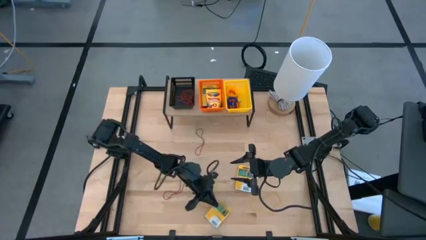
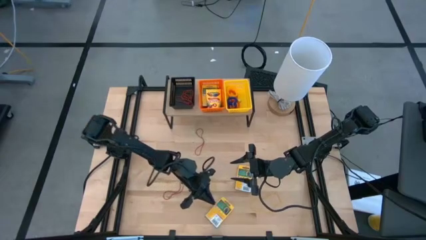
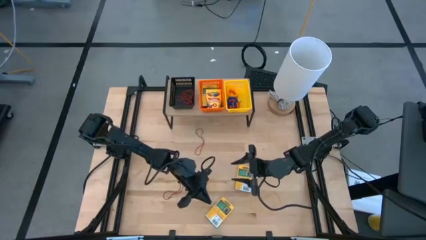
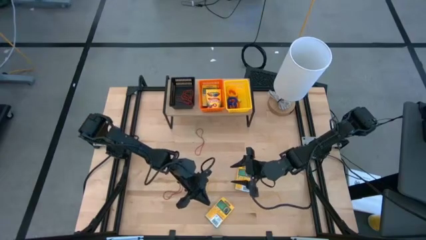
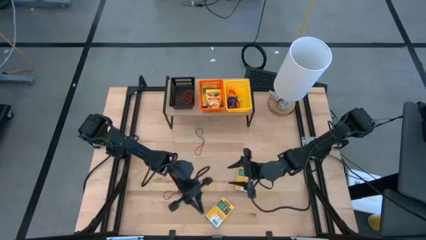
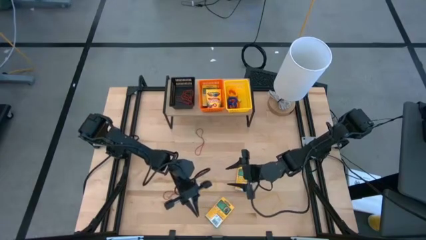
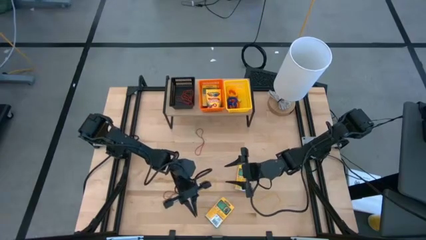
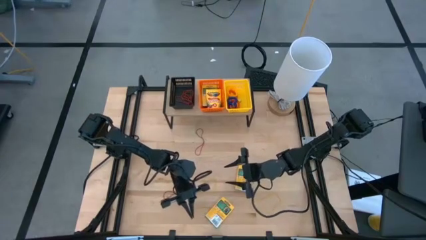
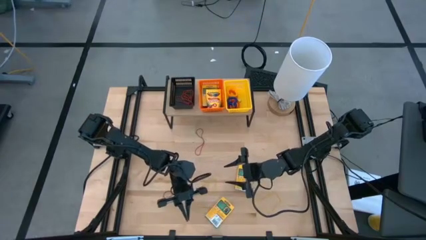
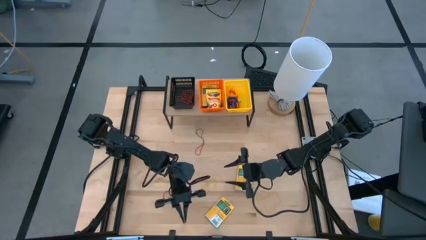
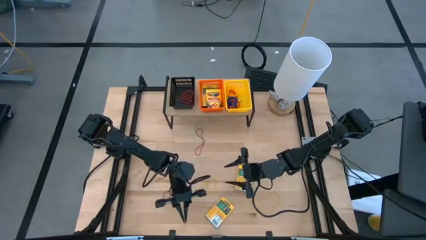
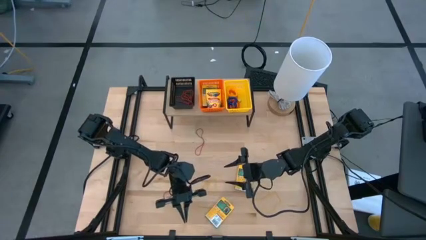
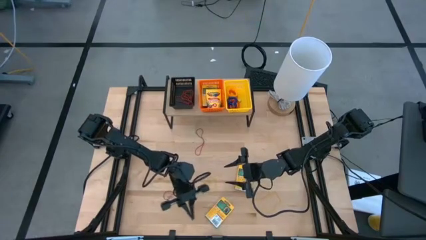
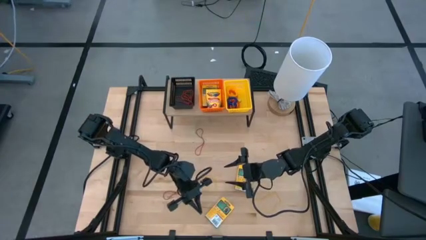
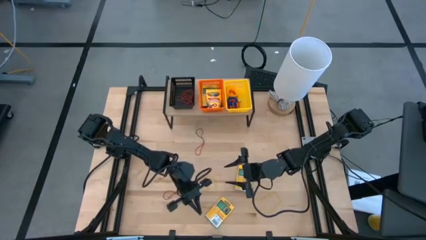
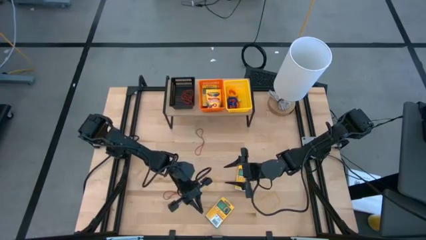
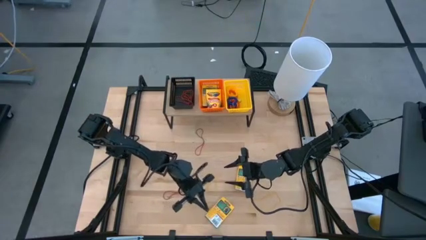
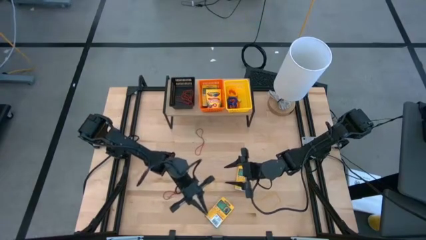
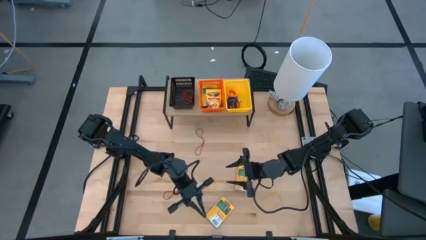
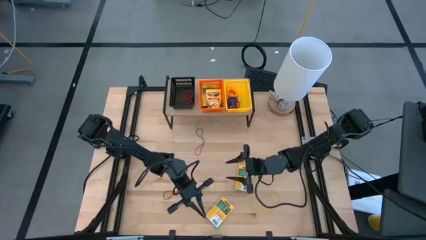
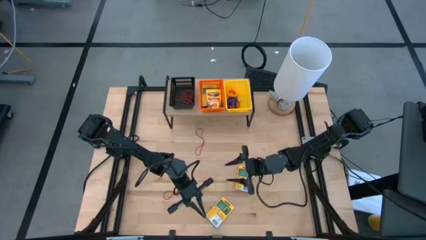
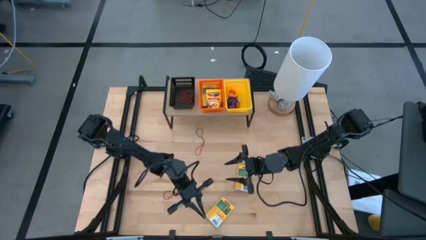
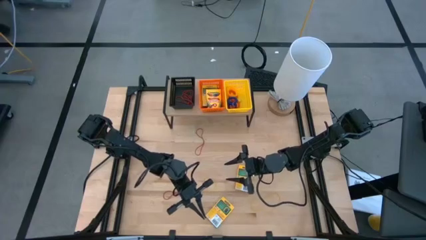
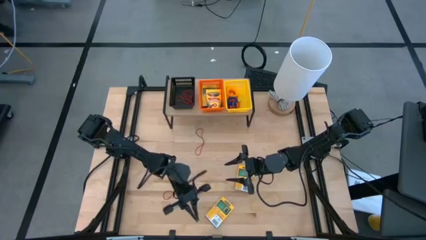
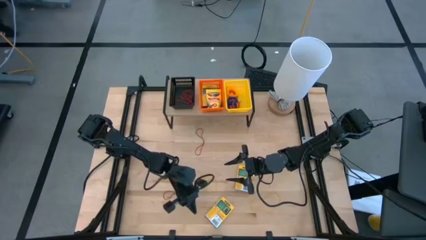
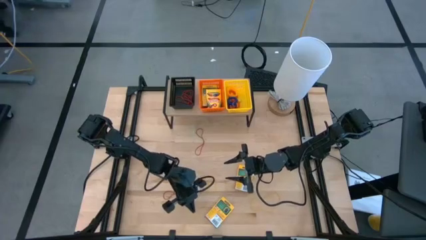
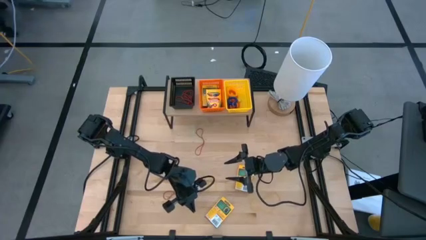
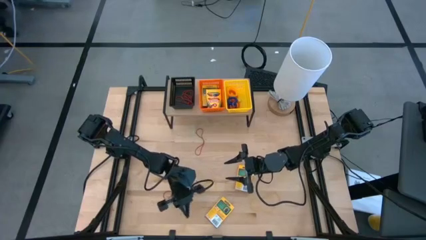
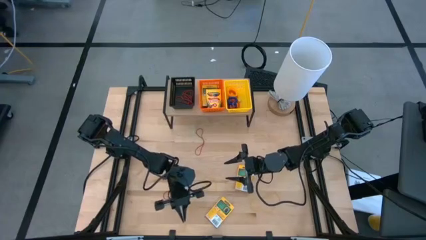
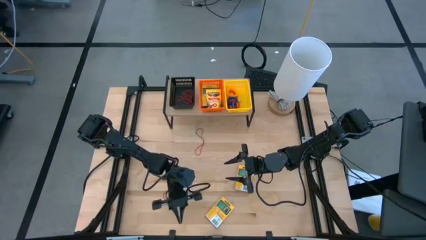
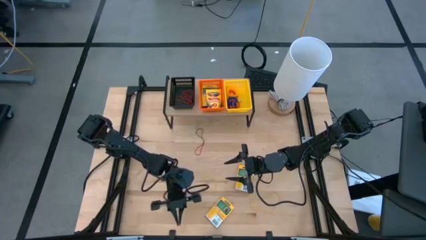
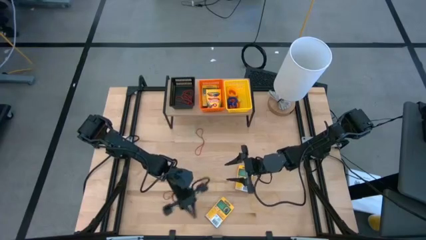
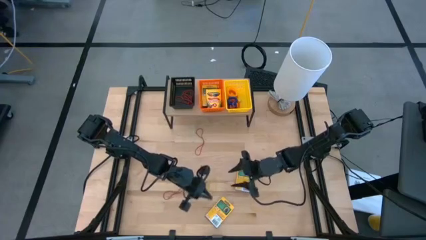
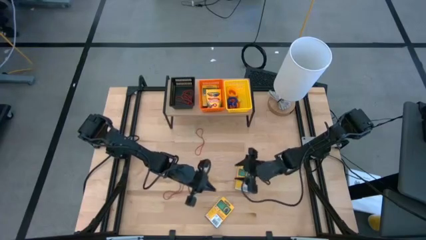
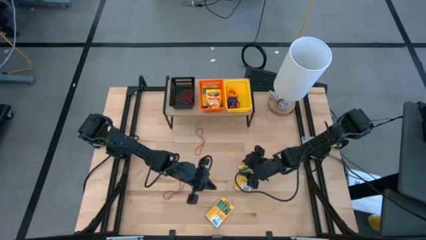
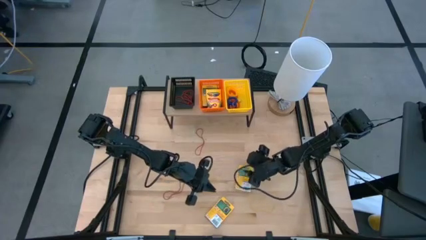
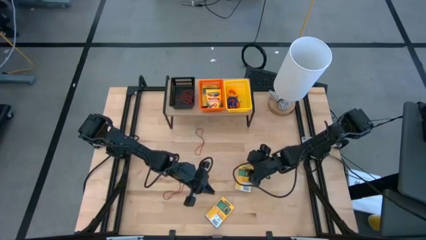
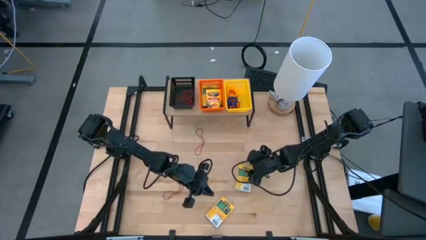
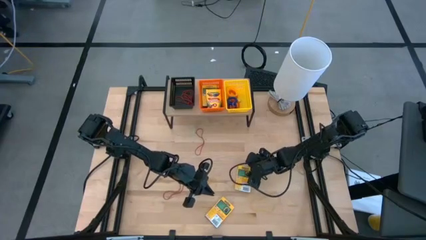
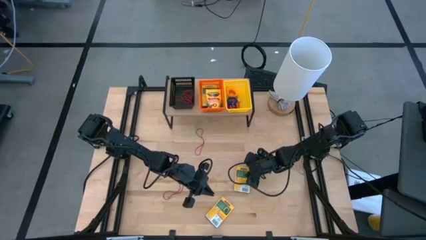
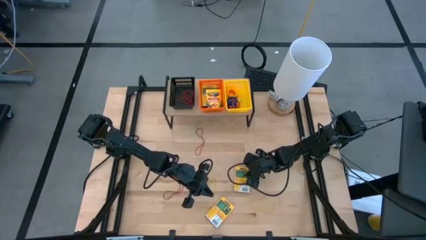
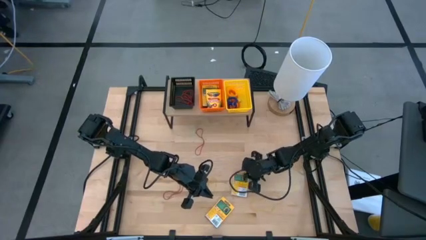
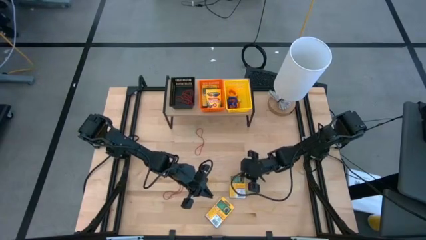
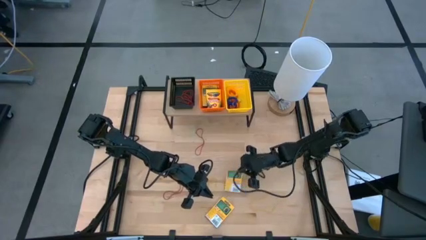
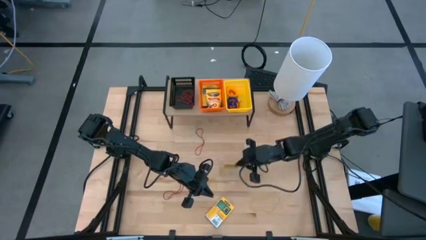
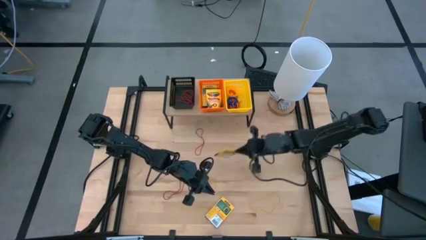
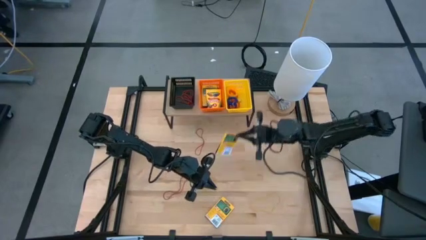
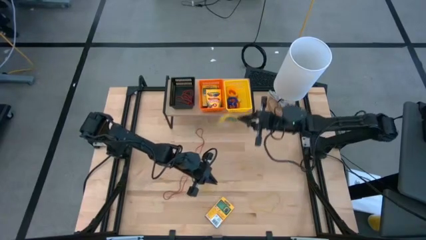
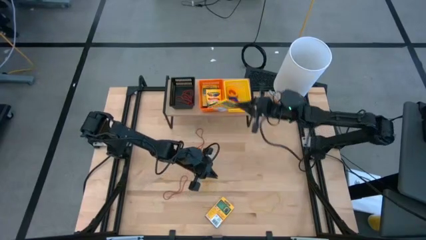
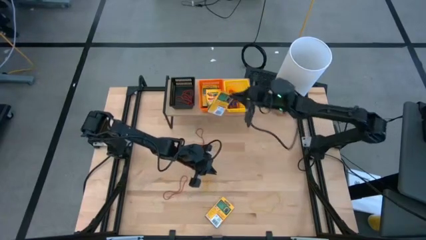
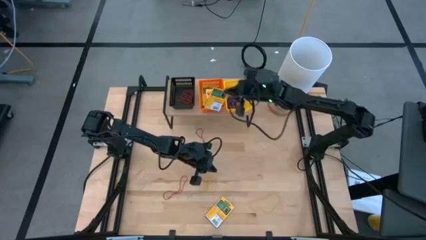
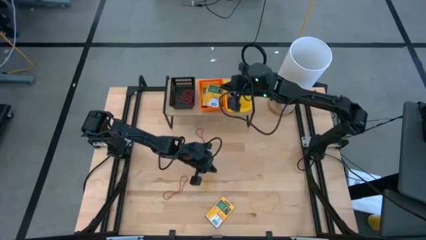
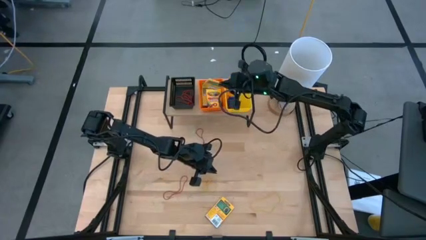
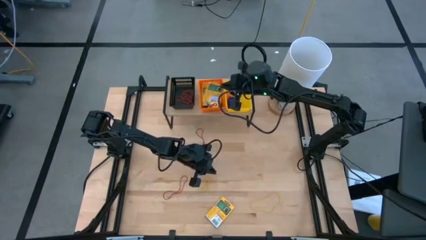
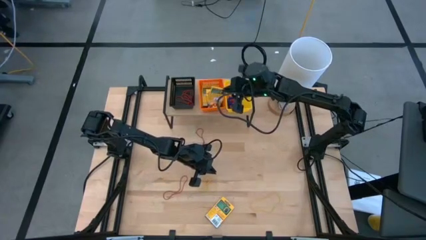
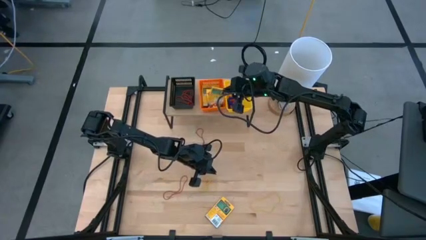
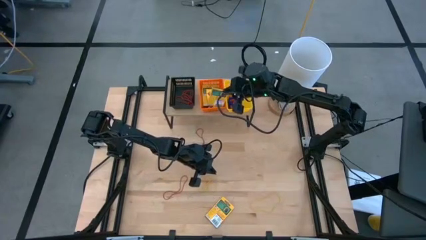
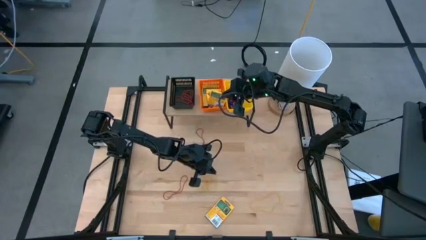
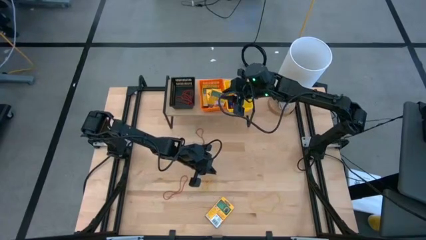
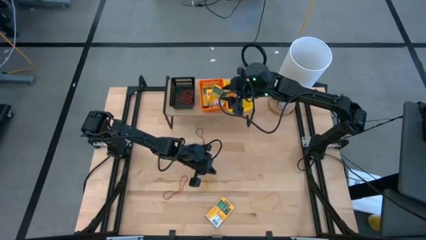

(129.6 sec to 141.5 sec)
Task: Pick & Place Office Desk Supplies
Put the yellow crayon box into the orange bin on the shelf

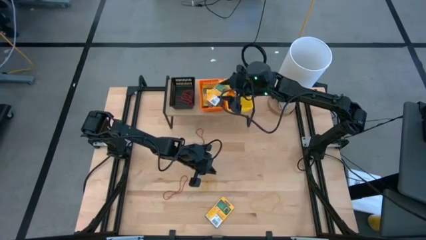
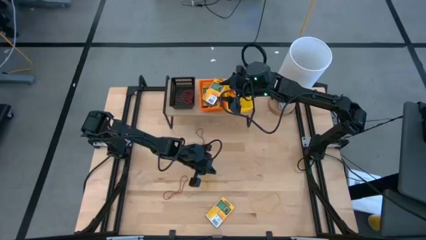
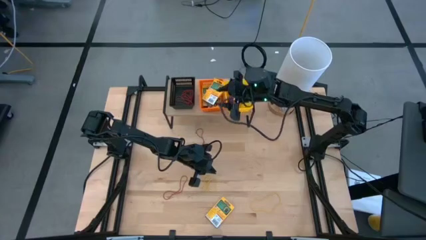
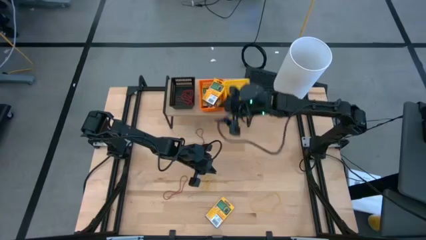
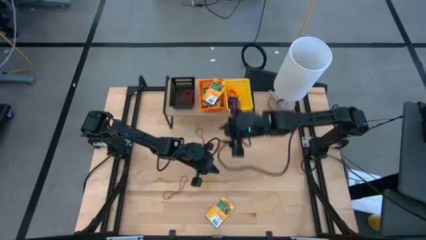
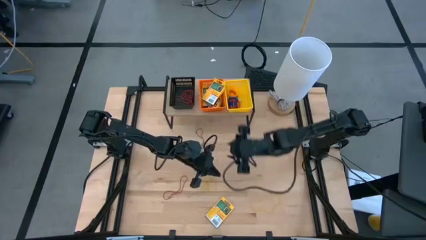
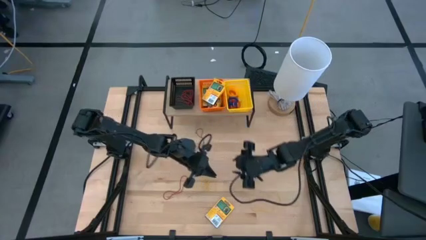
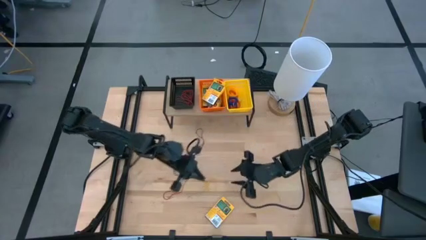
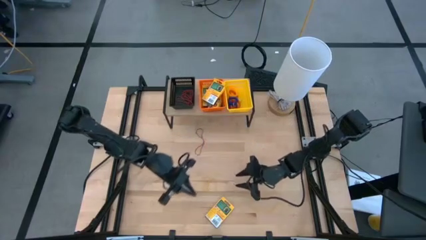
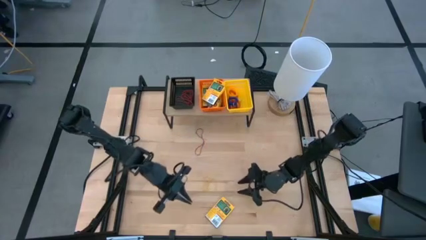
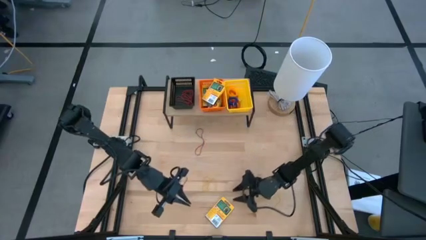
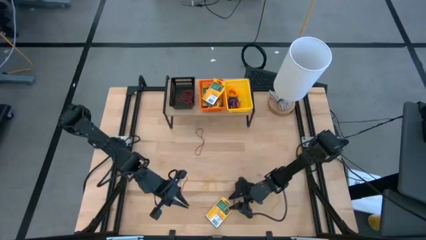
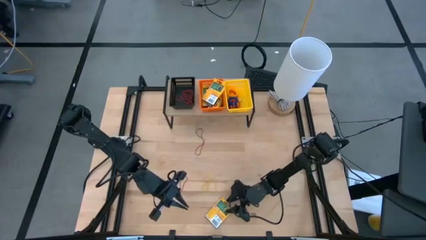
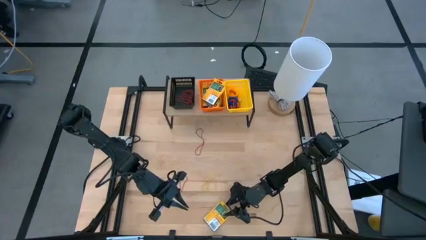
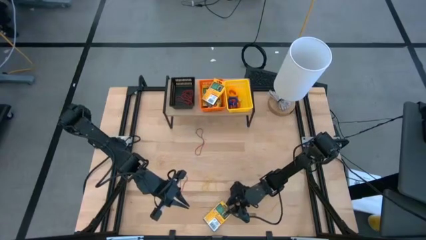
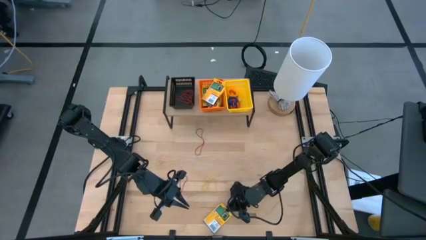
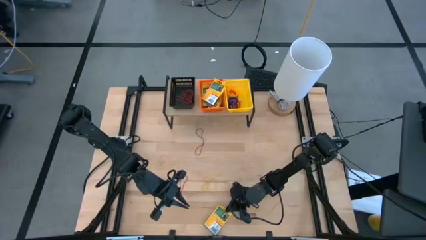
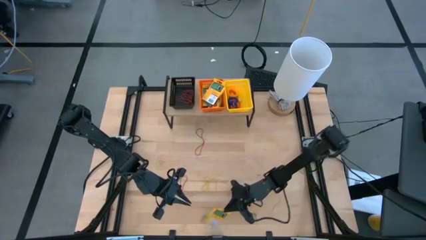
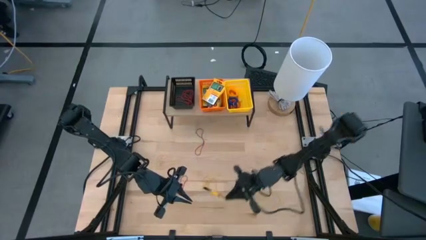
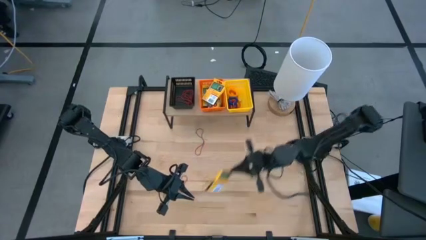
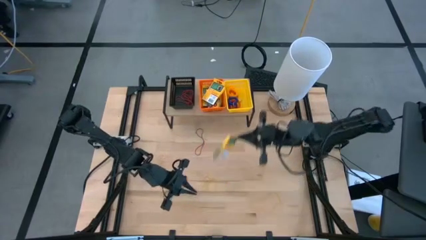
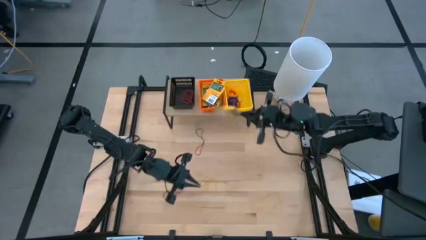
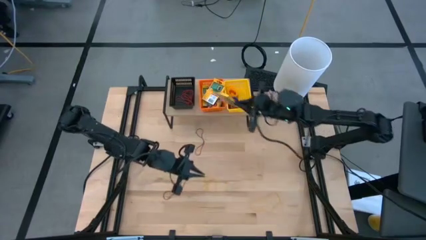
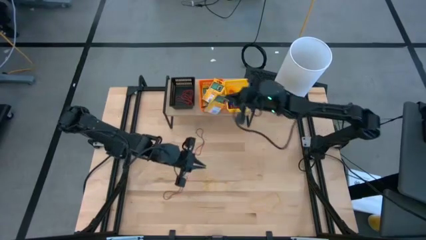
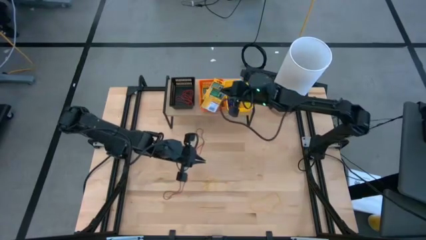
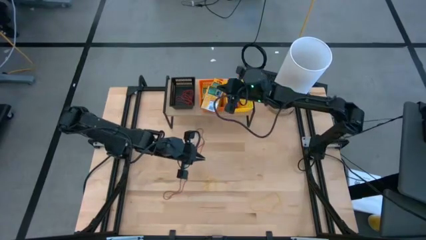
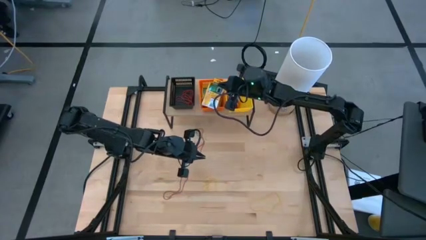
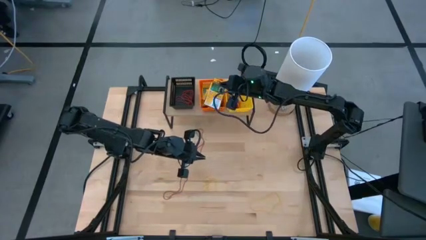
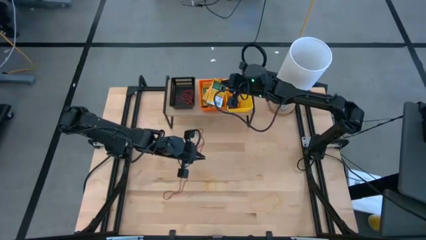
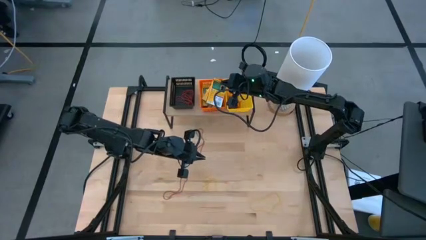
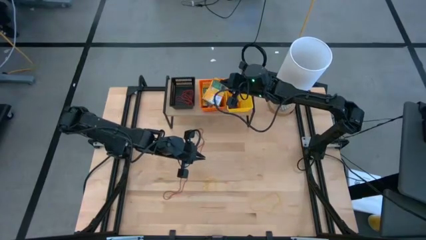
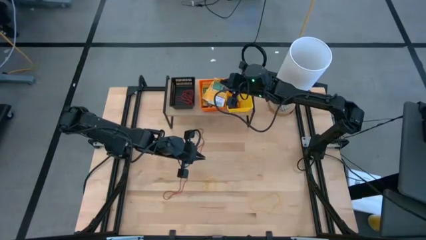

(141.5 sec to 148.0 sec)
Put the yellow crayon box into the orange bin on the shelf
